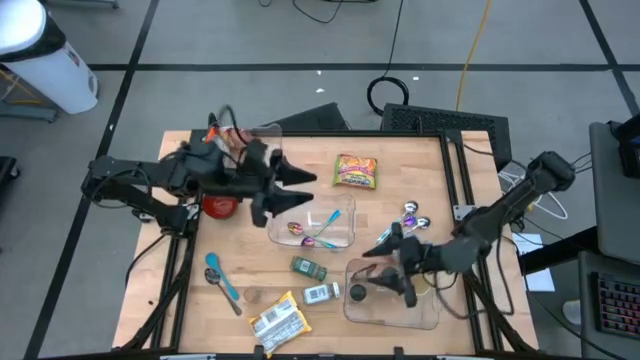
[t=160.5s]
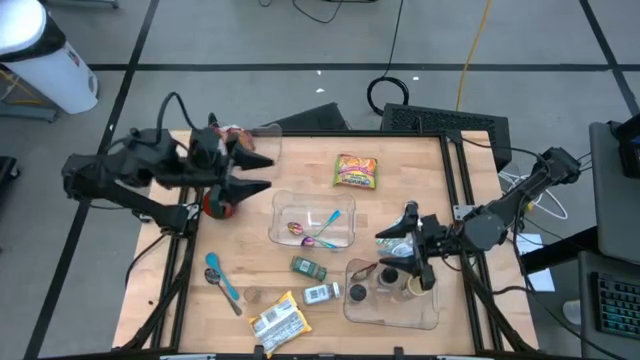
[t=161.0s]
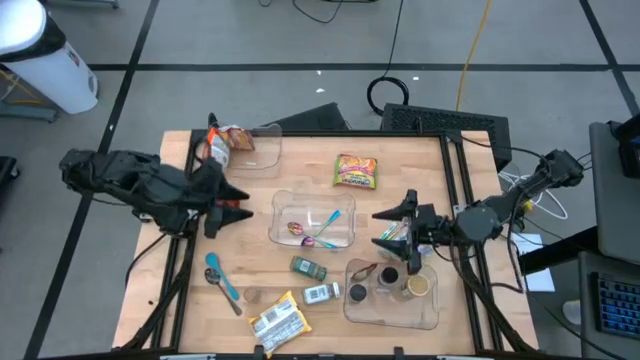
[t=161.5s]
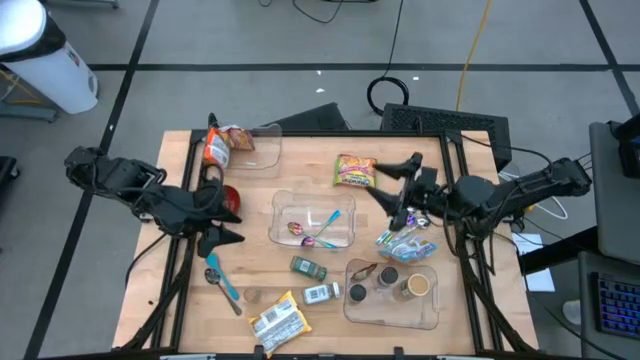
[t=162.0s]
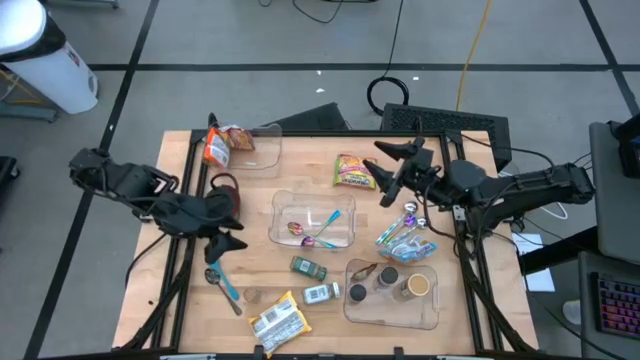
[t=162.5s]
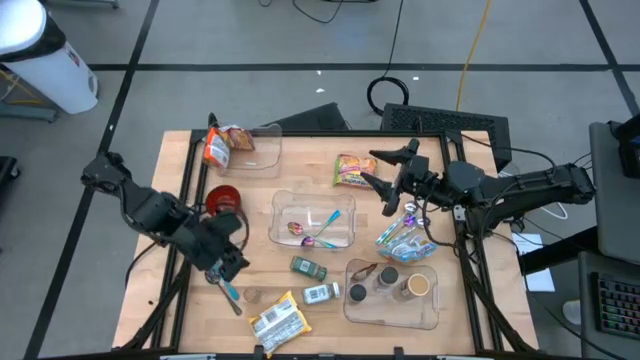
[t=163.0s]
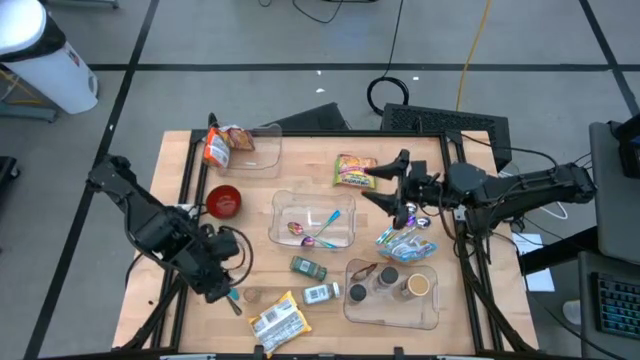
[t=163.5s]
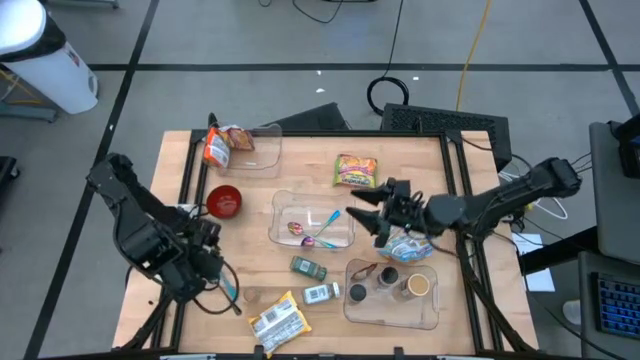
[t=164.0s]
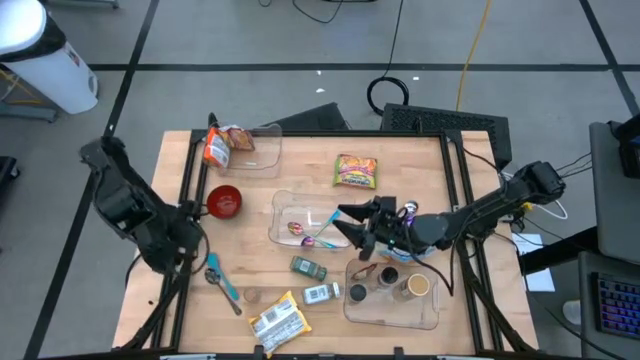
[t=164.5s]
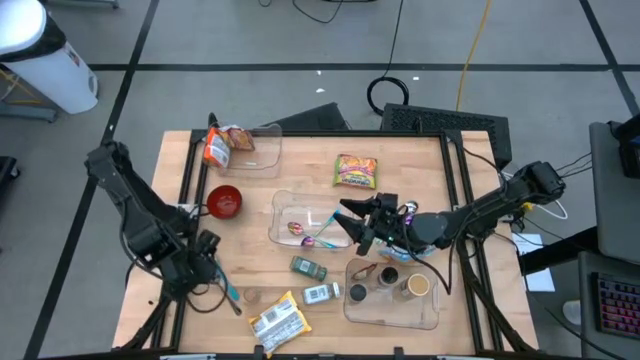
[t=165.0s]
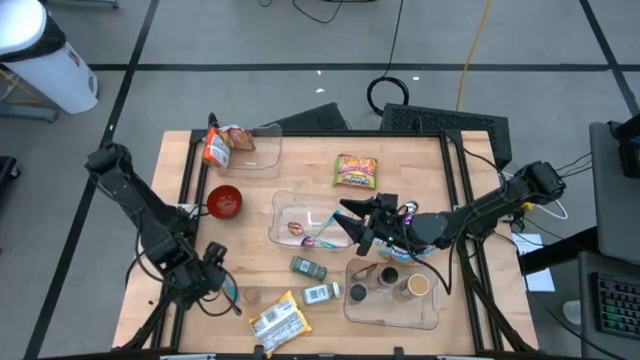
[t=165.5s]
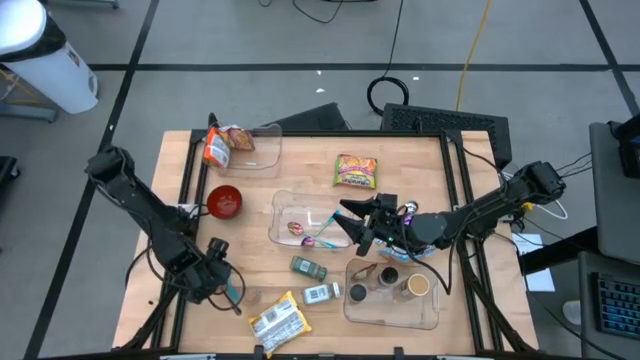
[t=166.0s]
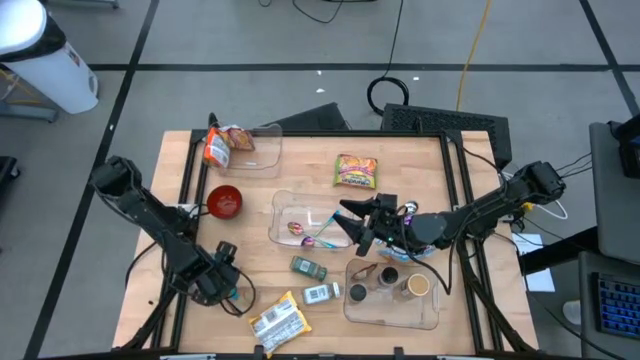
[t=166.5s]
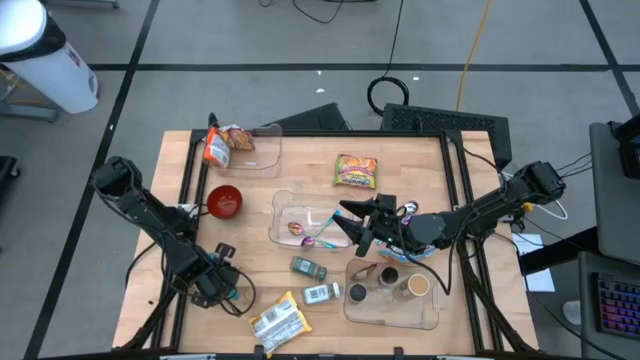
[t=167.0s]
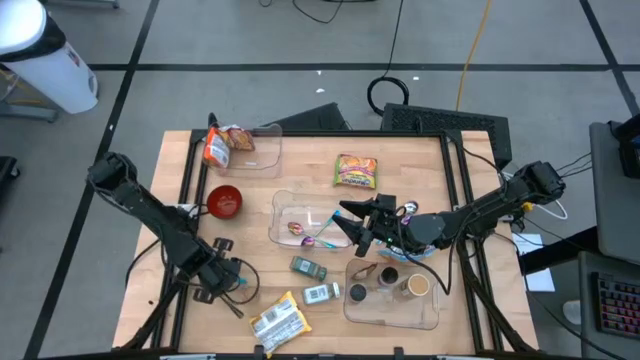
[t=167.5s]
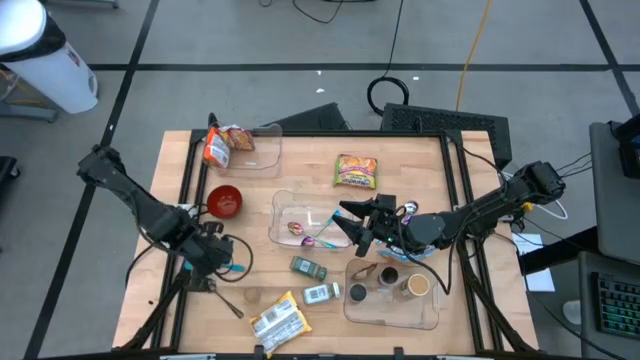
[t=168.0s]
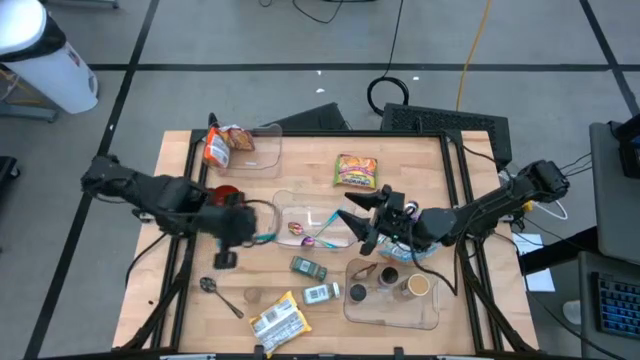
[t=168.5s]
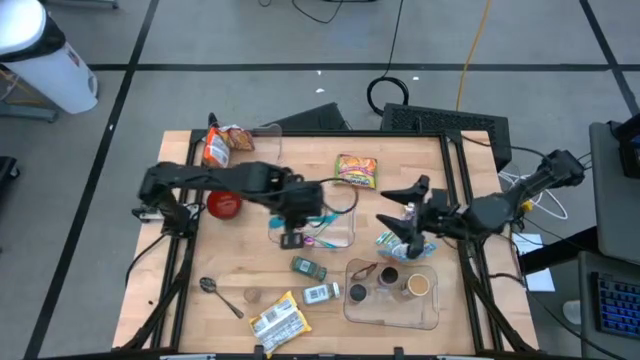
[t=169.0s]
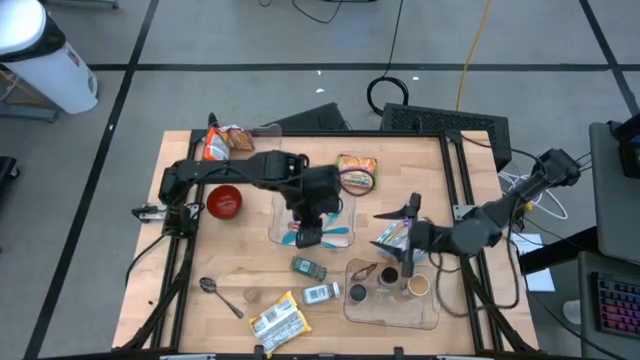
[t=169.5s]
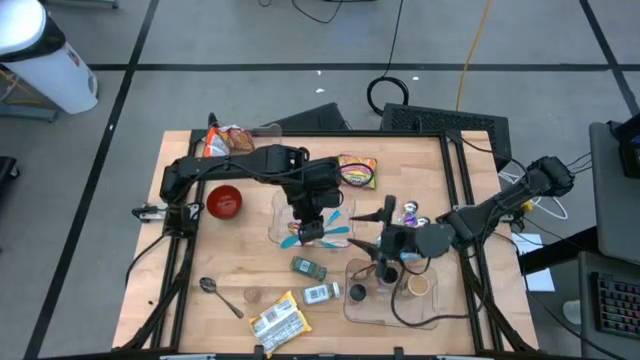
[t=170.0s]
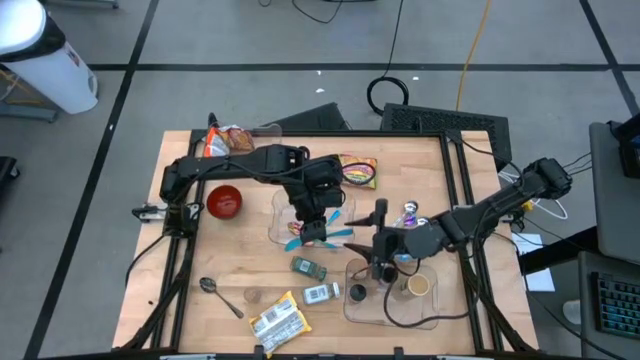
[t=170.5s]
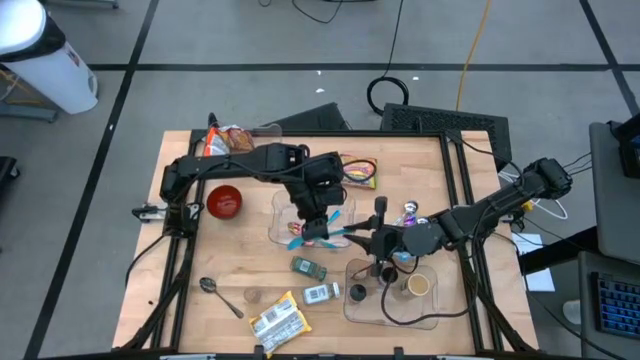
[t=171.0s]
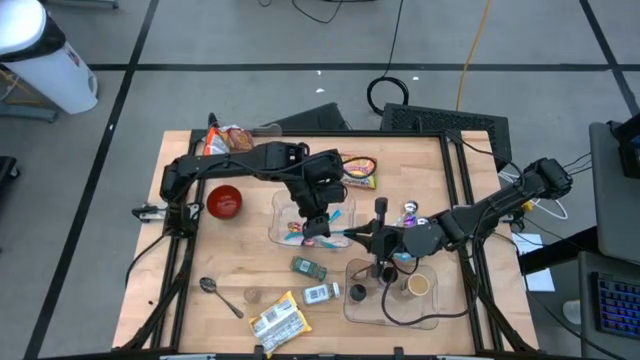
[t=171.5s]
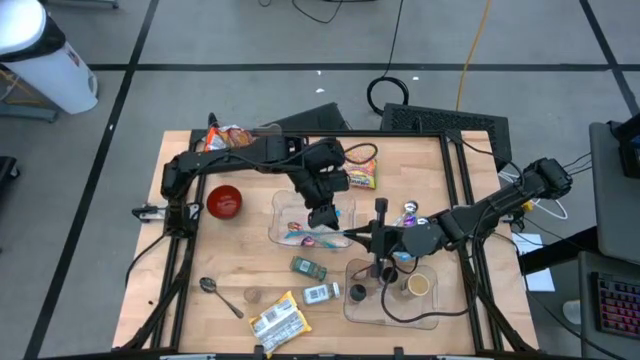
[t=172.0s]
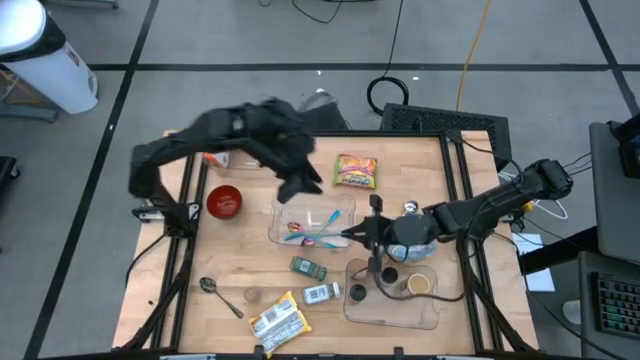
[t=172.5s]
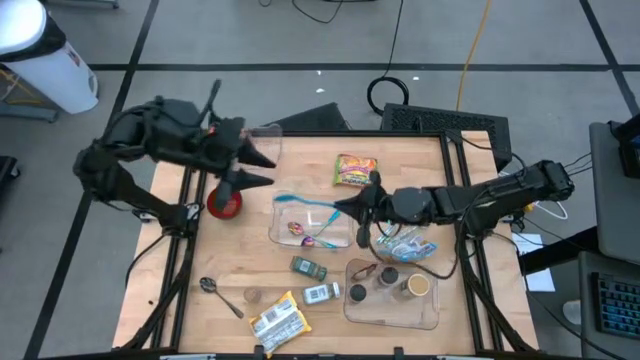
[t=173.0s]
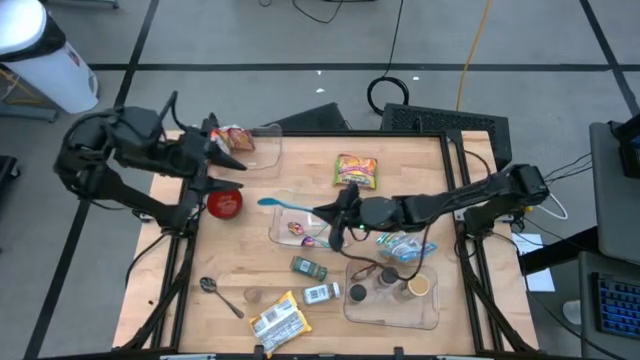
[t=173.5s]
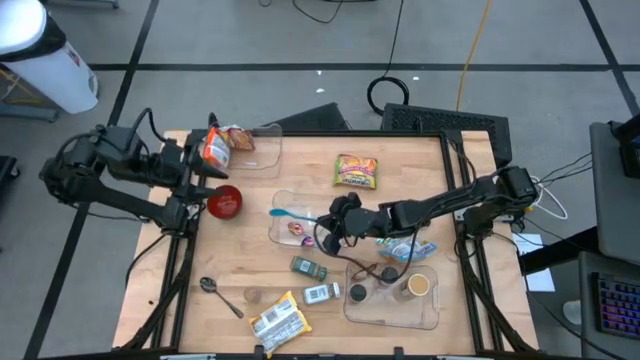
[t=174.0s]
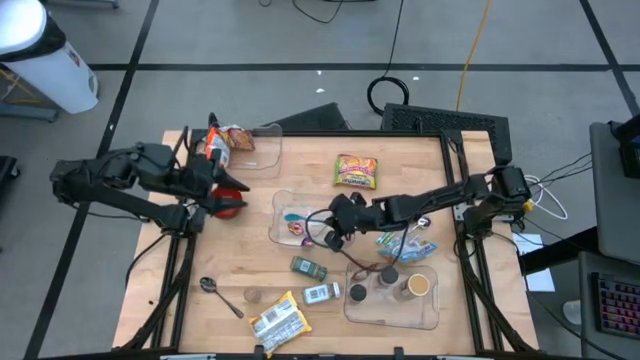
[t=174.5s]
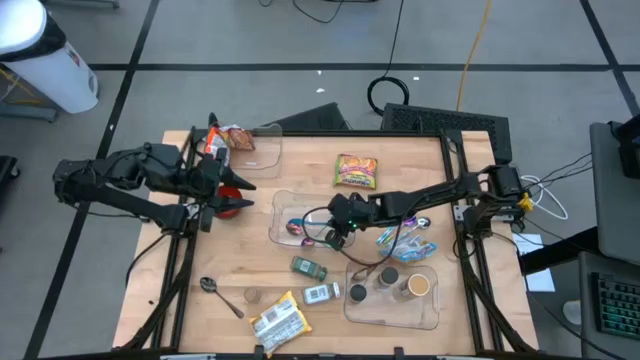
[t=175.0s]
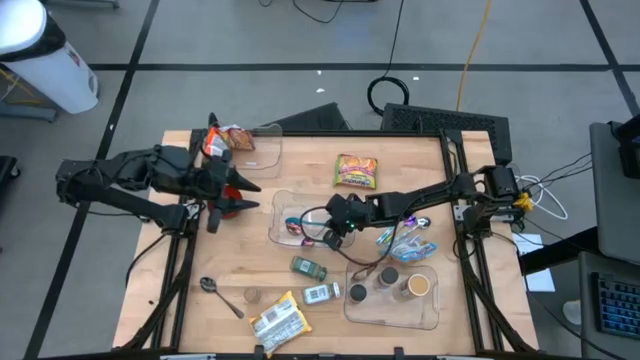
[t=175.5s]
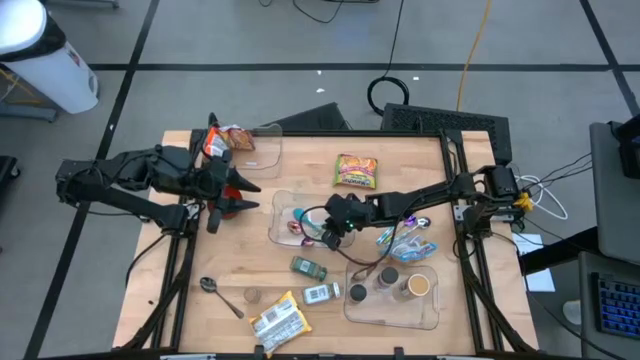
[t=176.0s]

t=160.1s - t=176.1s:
Task: Pick & Place Food Item
Put the blue serving spoon into the middle transparent bin

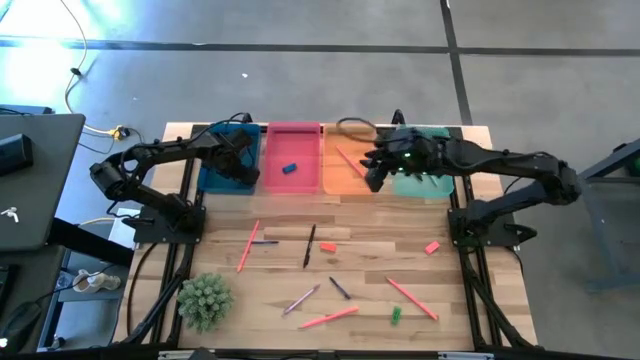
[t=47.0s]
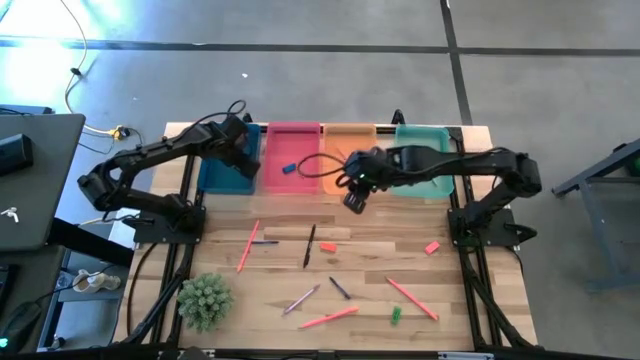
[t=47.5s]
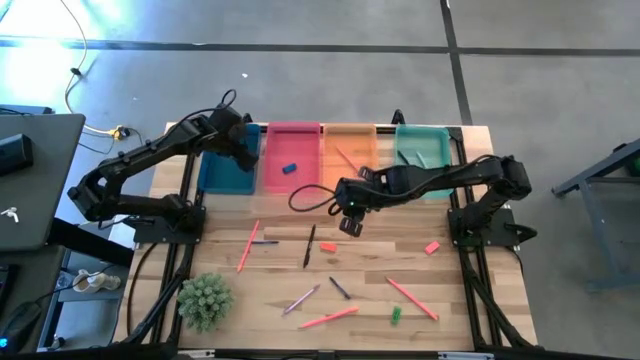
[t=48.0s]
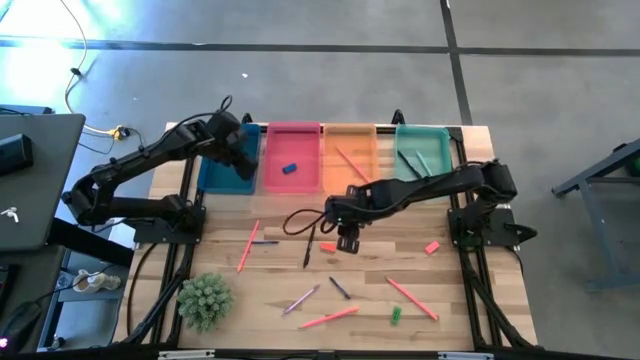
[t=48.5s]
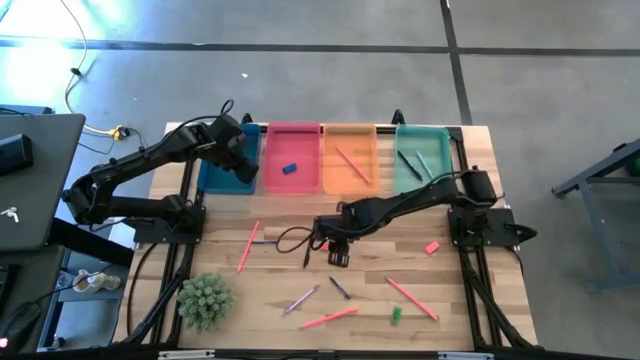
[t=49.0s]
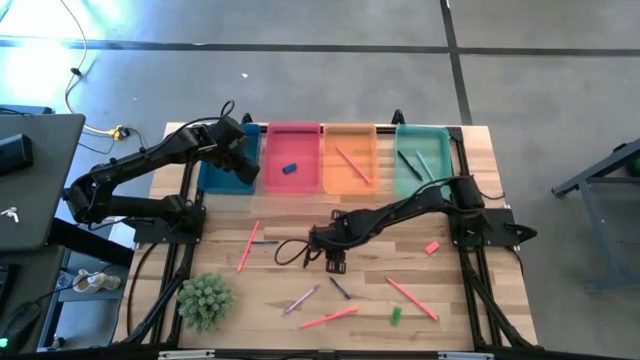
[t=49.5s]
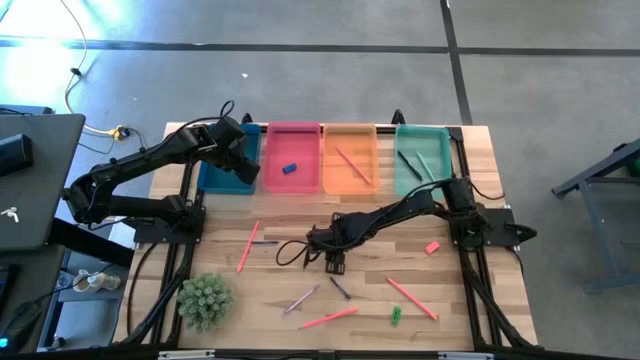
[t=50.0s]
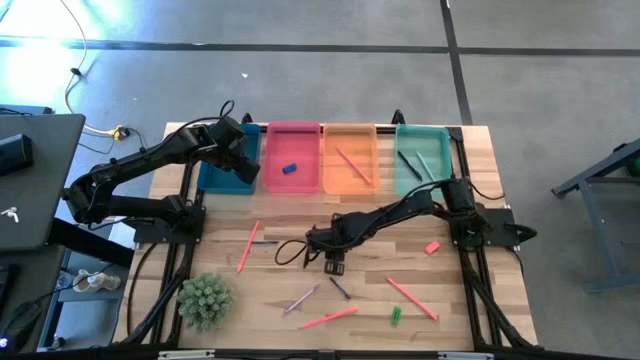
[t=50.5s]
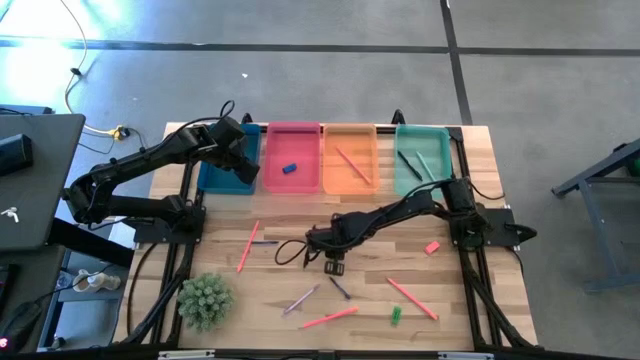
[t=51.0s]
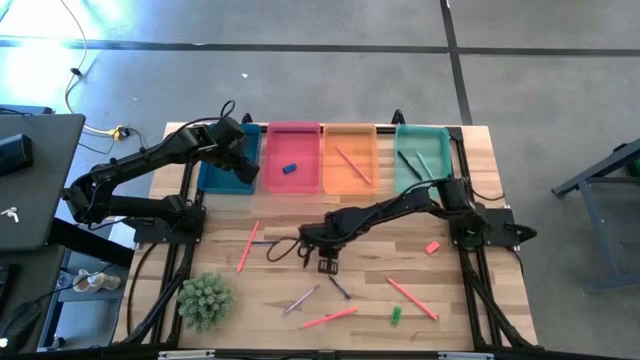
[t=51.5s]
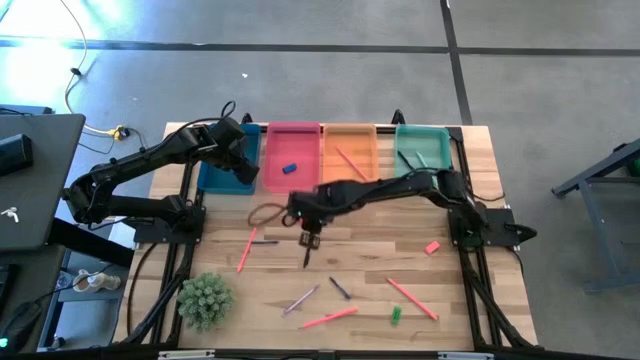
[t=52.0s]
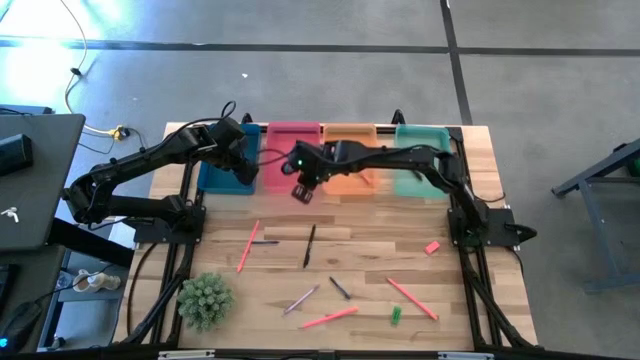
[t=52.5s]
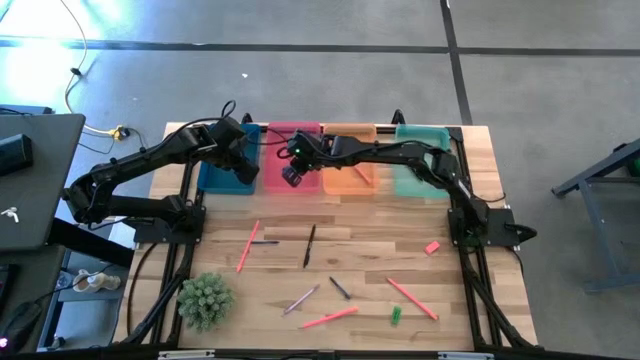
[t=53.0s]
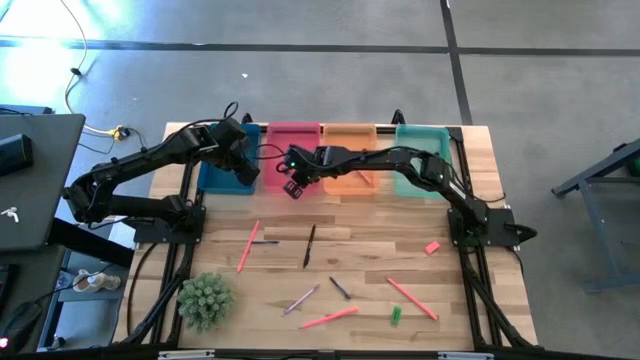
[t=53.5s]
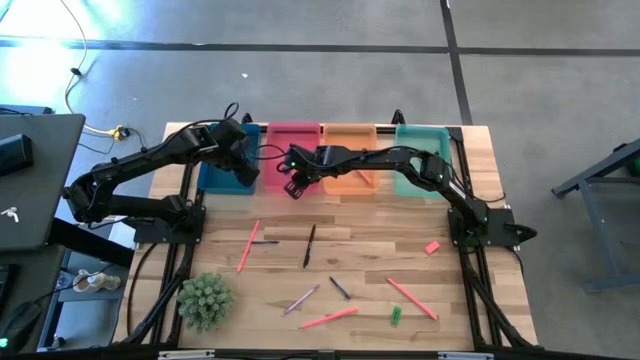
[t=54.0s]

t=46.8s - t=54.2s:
Task: Sort crayons/erasers/pens/pencils in bins
Put the orange eraser into the pink bin
